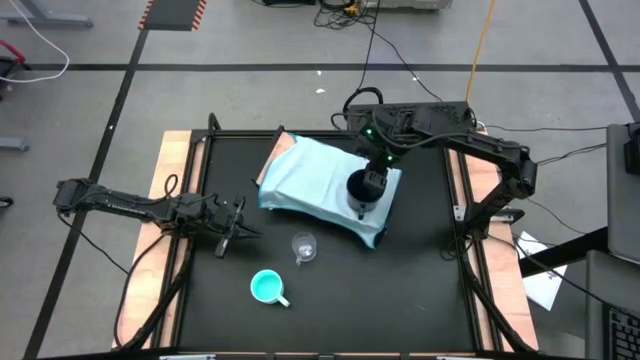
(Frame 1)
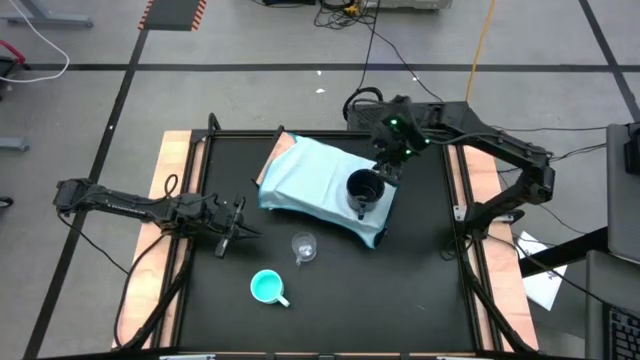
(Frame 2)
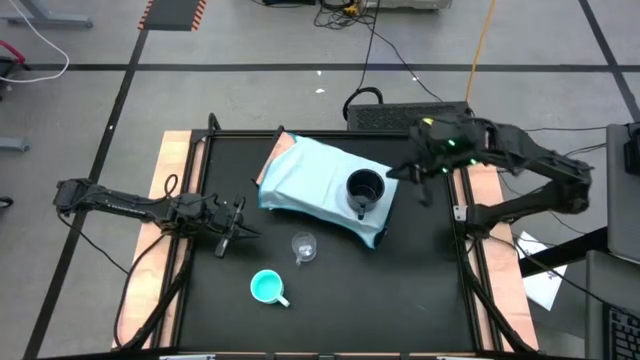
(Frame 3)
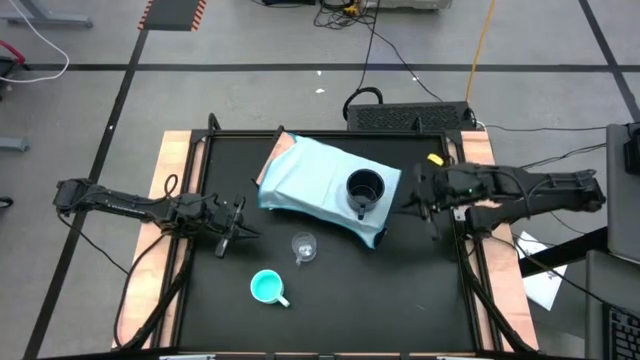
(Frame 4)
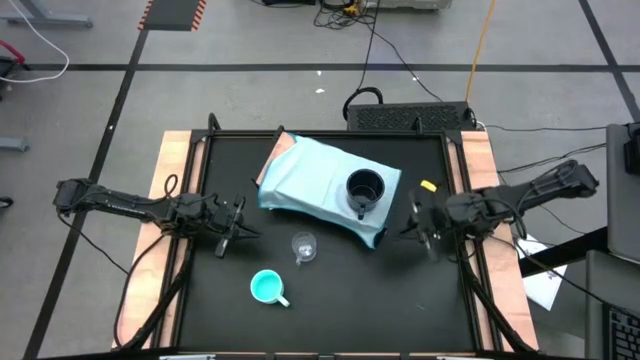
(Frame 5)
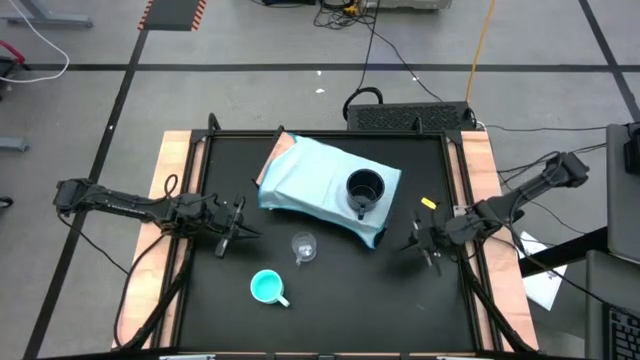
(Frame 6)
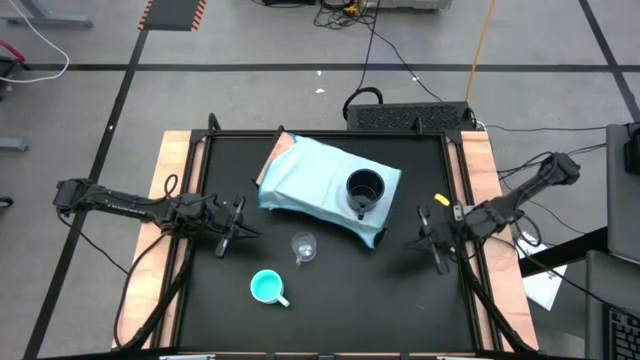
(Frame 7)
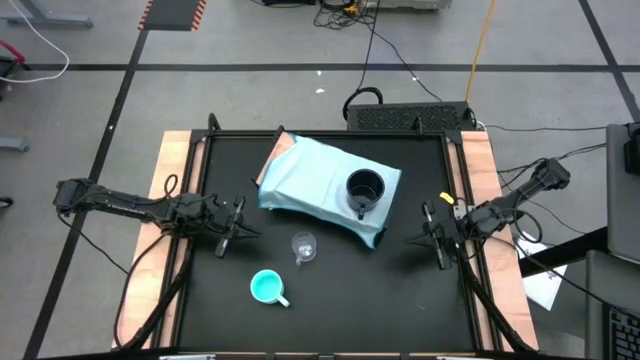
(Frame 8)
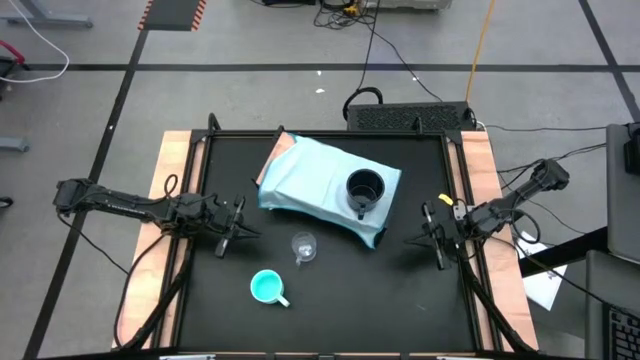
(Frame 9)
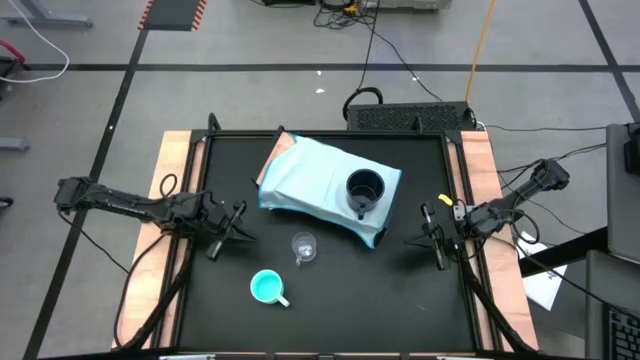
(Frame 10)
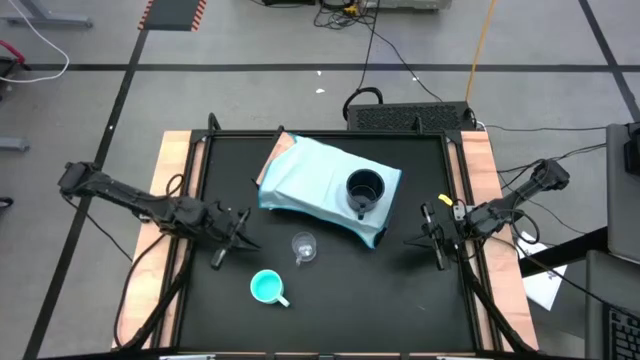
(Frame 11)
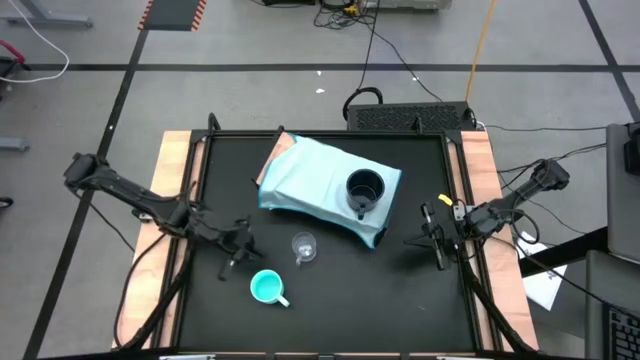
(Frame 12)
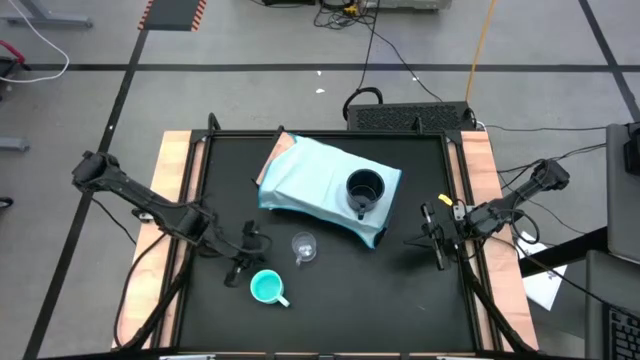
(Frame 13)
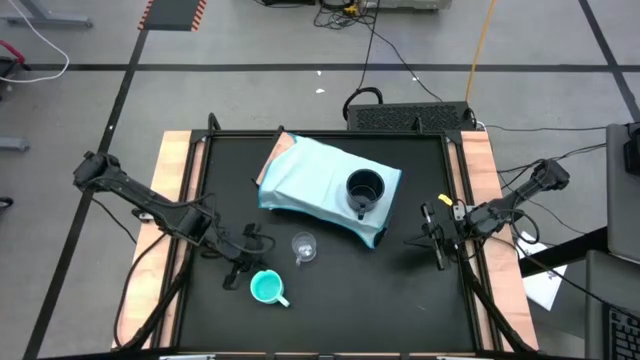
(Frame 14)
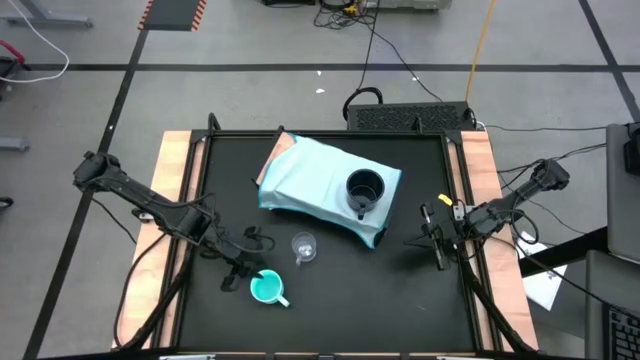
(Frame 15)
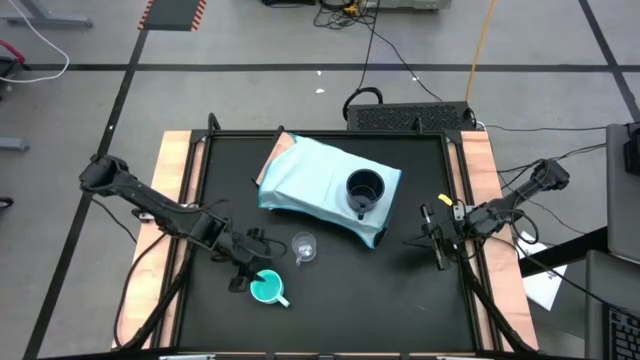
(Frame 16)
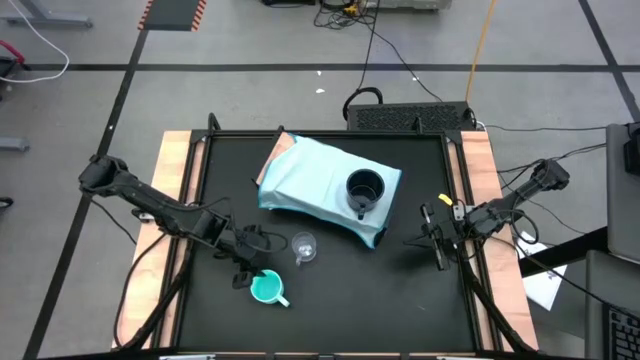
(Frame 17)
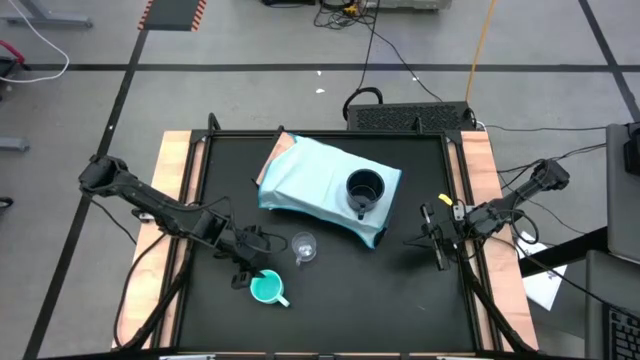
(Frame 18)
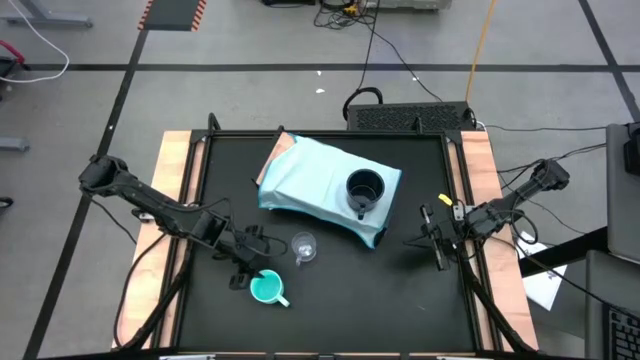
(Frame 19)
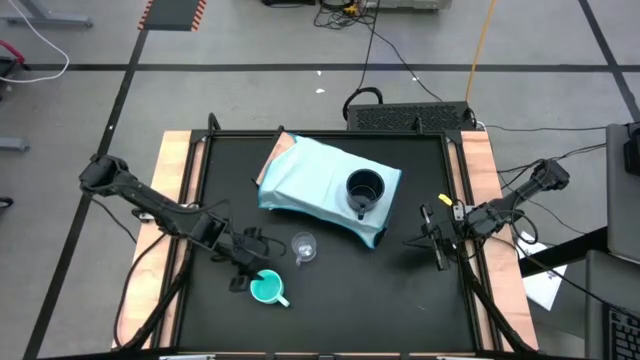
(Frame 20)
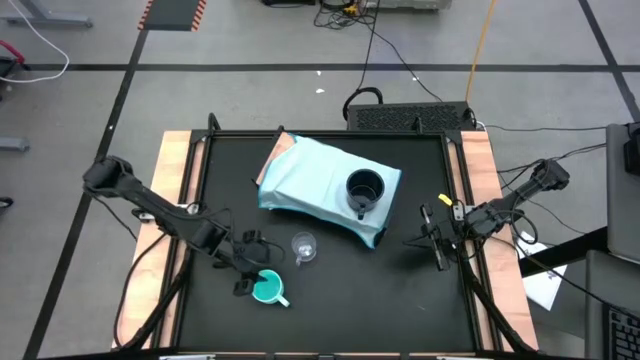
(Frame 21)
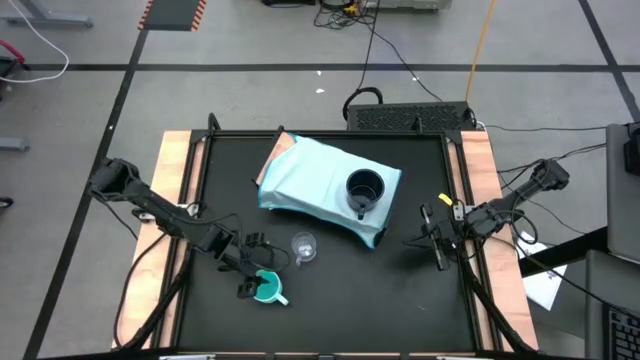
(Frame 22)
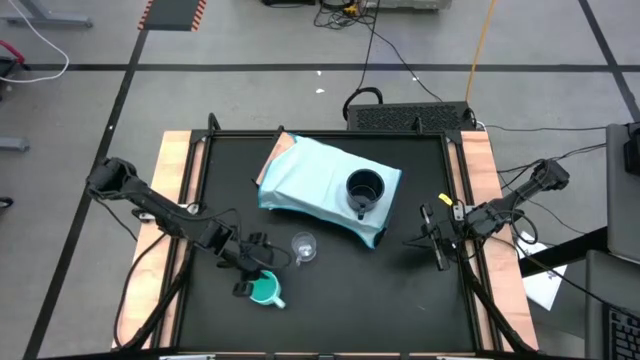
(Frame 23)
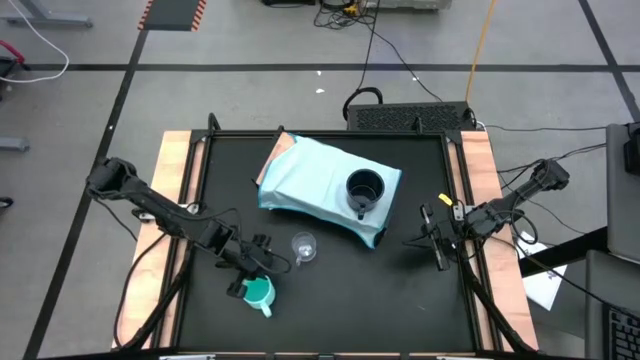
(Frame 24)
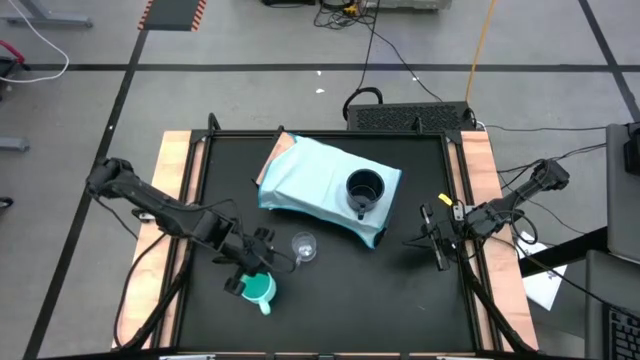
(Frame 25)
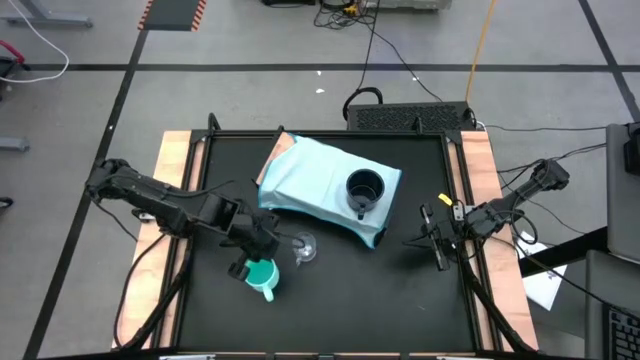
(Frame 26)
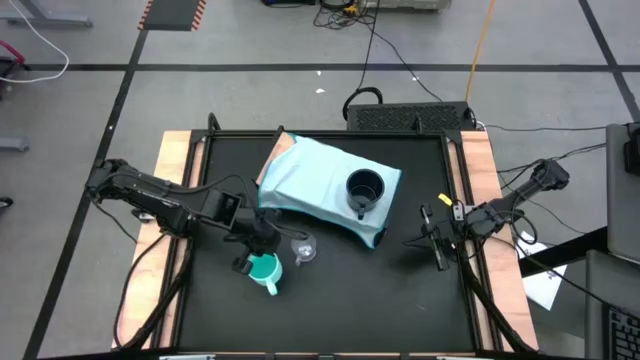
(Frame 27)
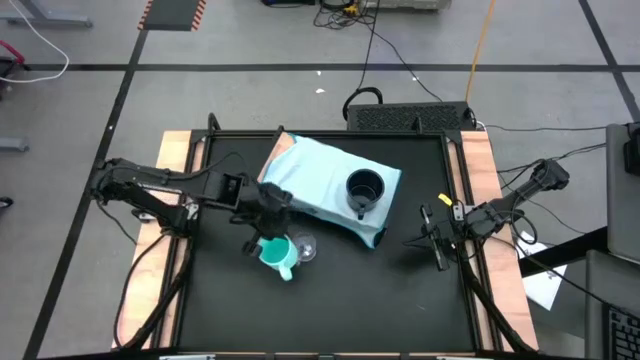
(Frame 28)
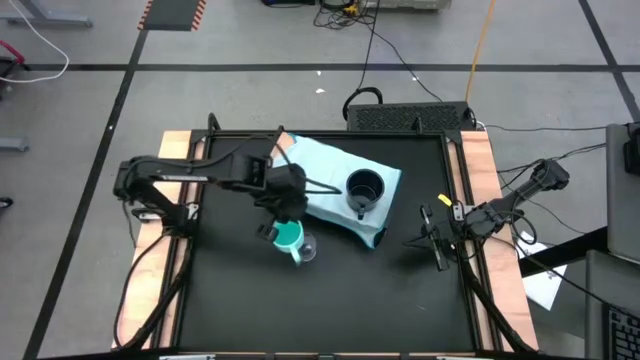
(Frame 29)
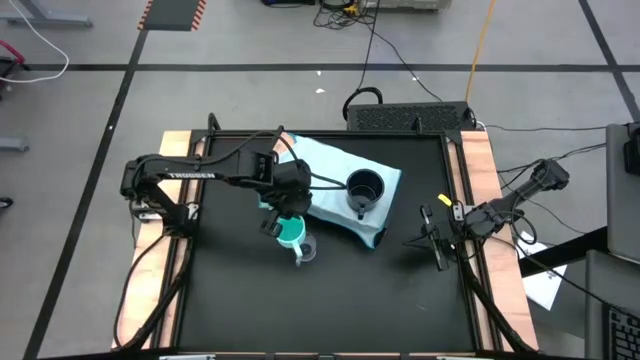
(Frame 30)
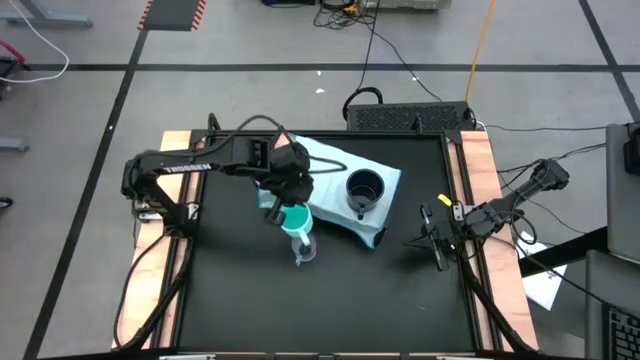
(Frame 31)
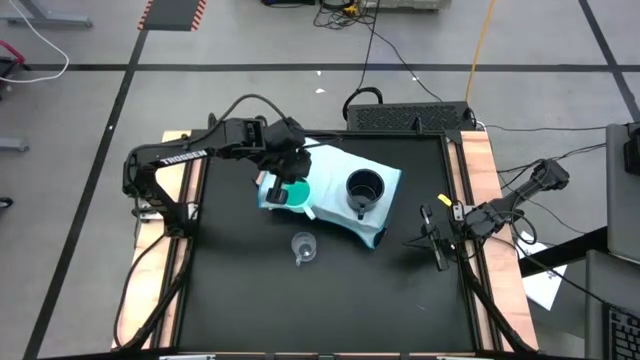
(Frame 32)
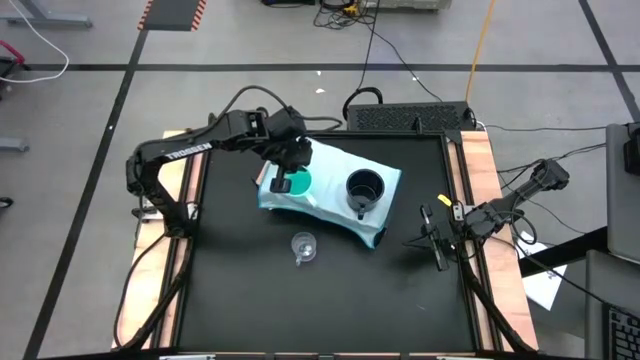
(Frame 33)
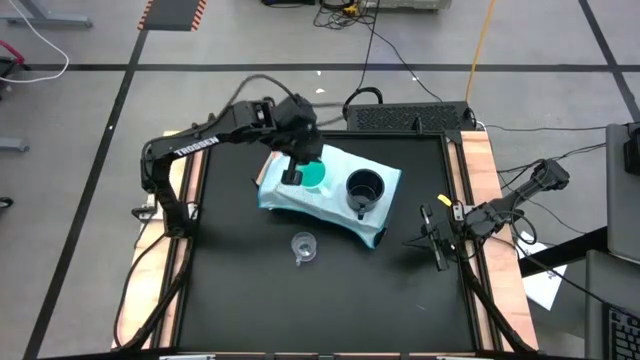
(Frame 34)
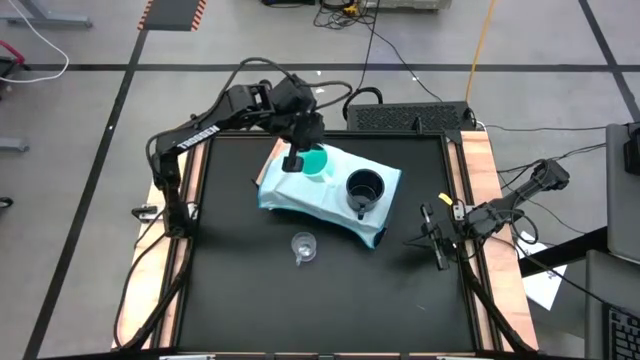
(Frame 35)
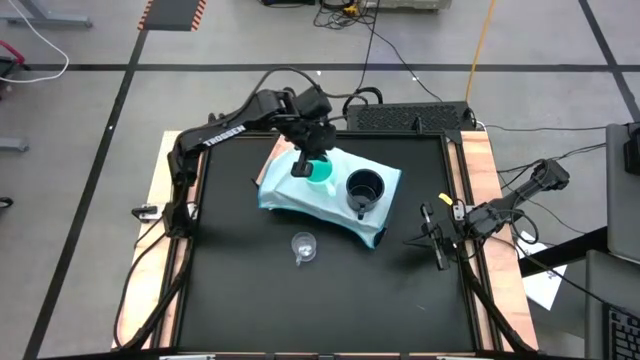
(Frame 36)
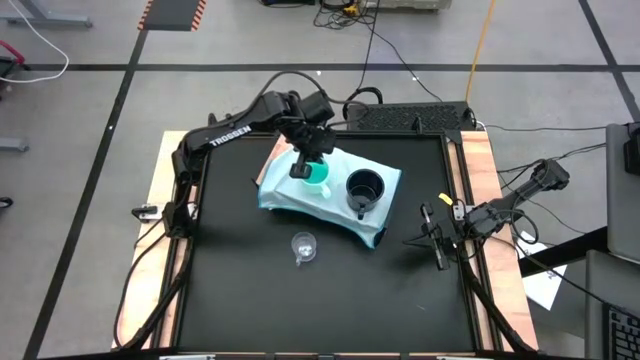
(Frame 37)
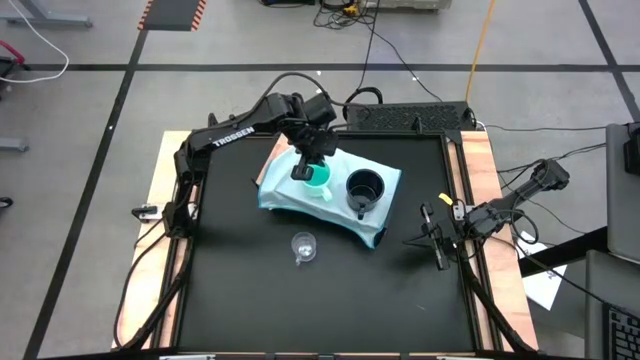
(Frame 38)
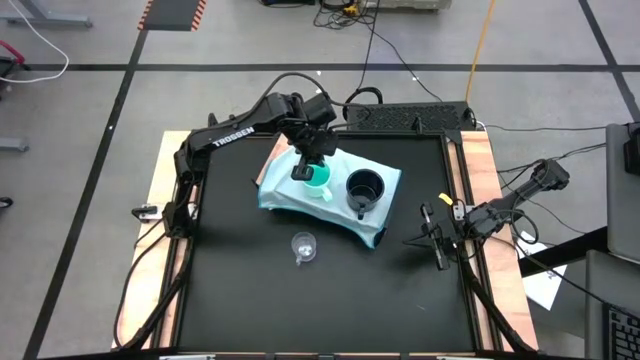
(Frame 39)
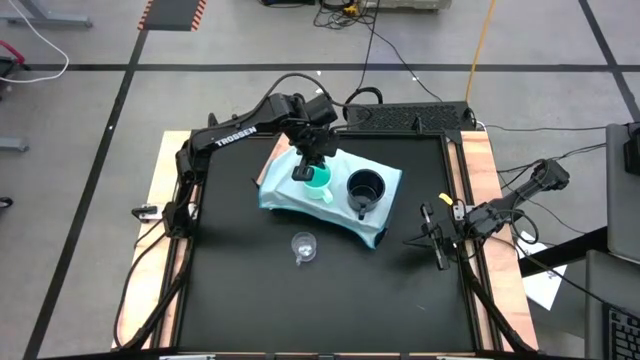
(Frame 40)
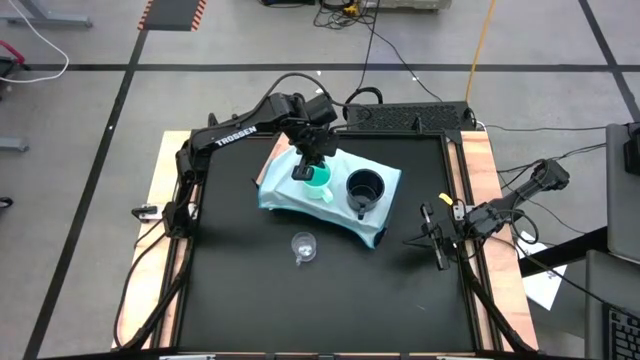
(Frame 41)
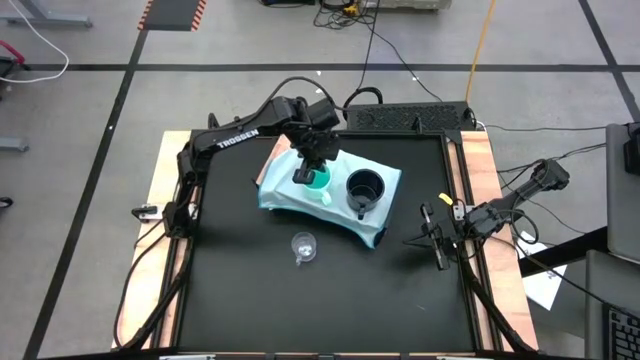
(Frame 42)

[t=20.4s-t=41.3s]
Task: Stack small to large cups/mugs on shelf
Put the light blue mug on the shelf
